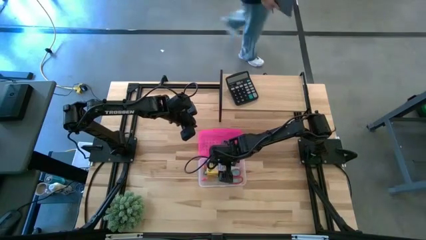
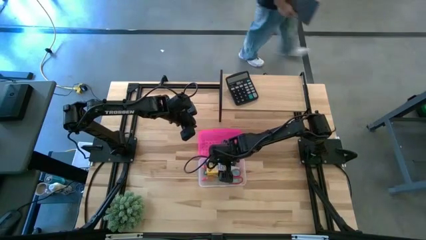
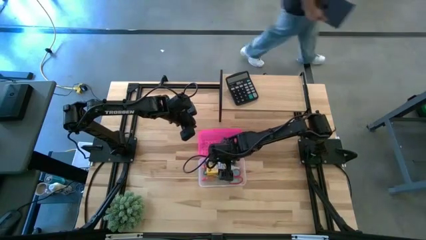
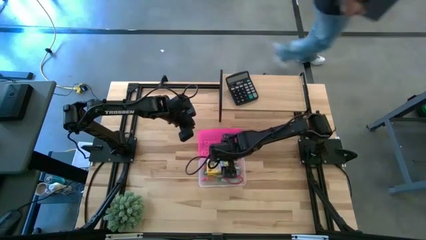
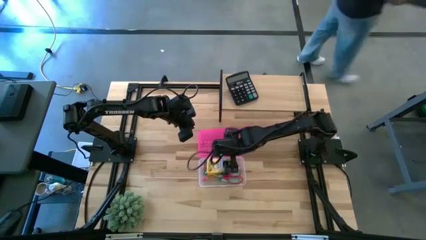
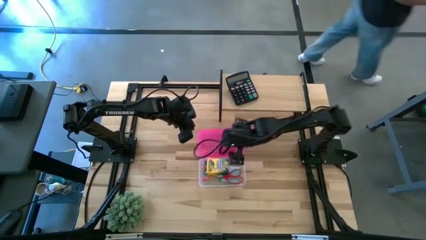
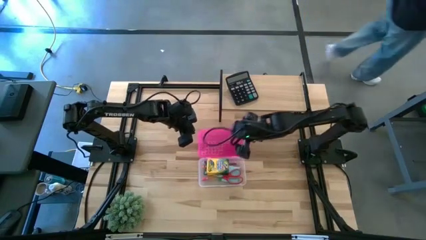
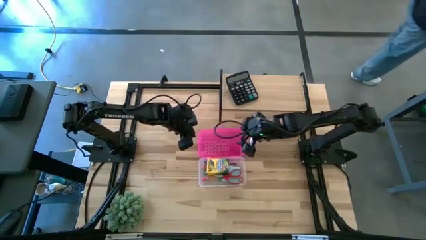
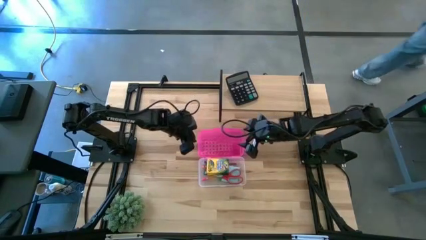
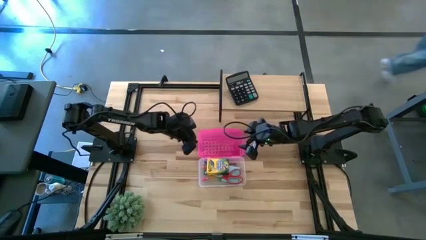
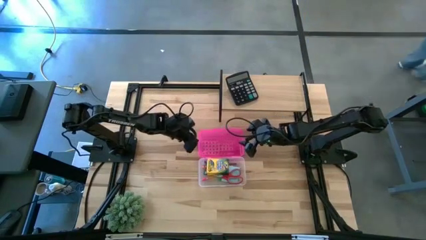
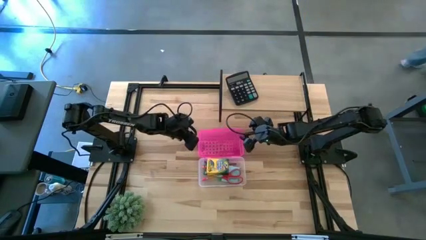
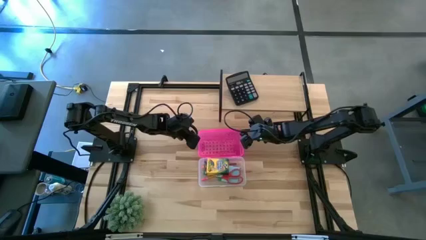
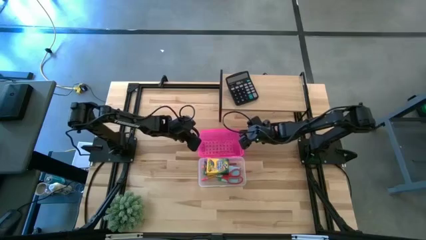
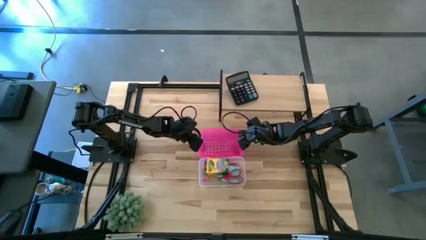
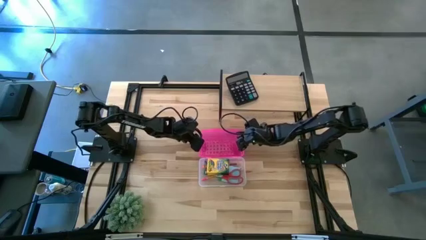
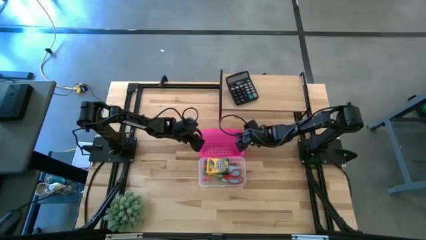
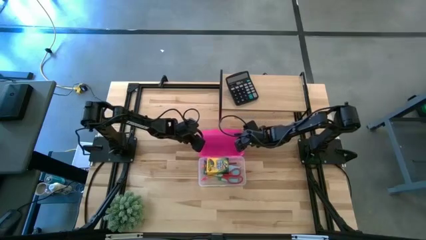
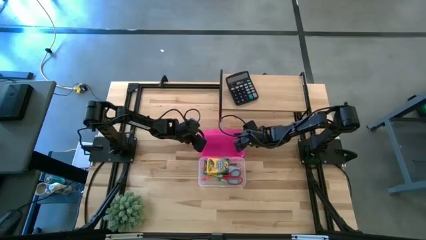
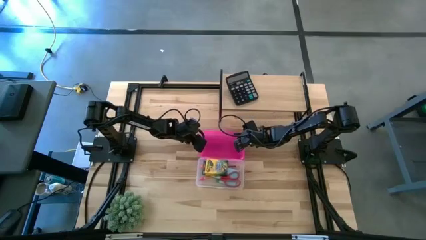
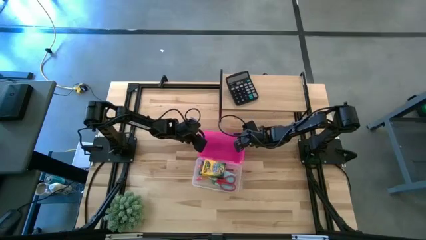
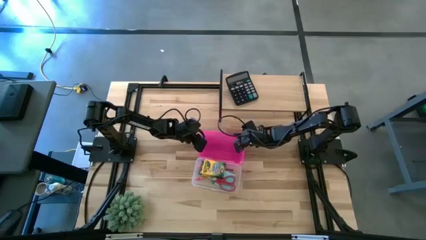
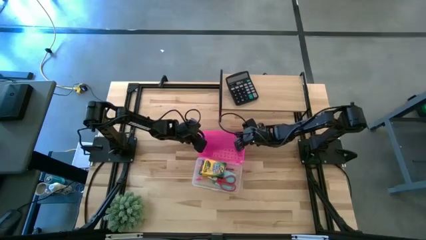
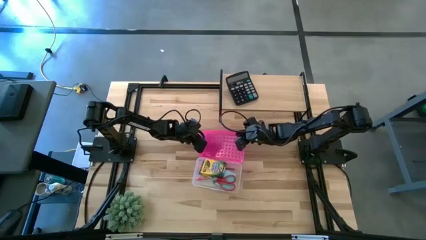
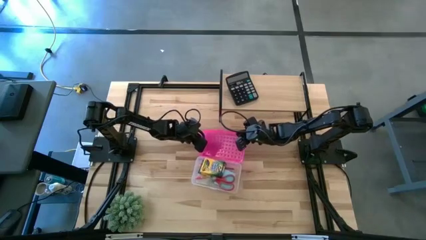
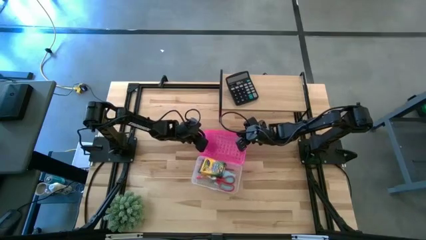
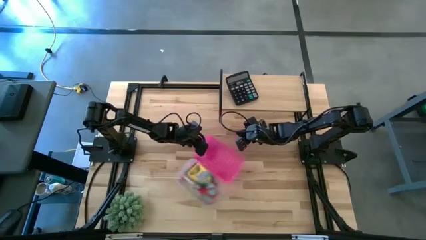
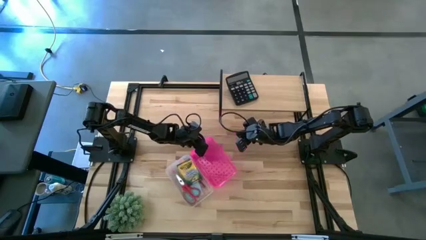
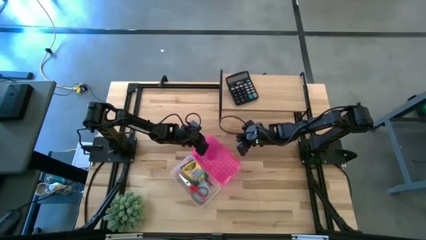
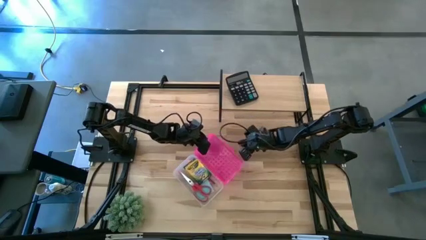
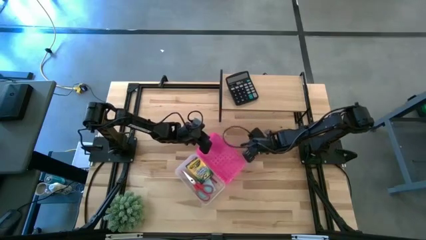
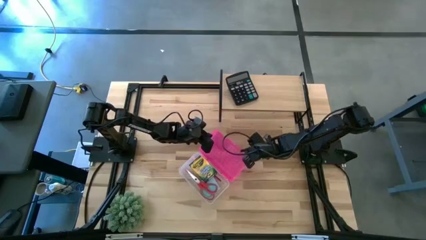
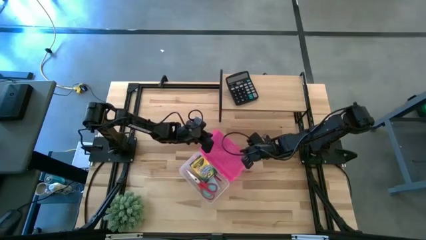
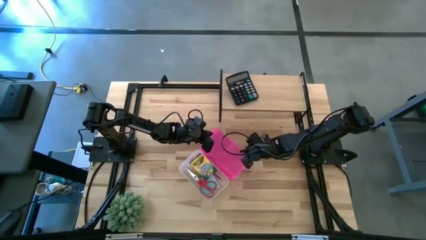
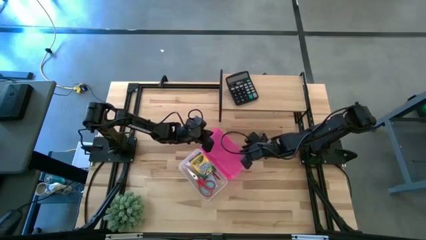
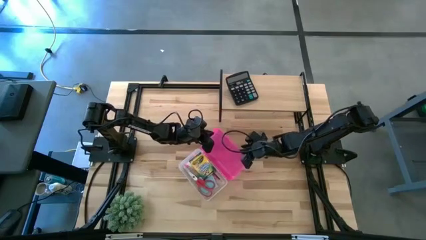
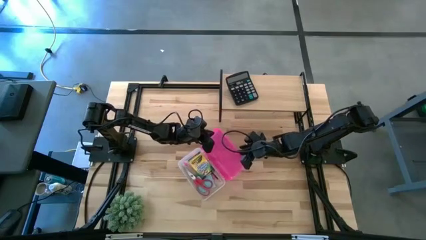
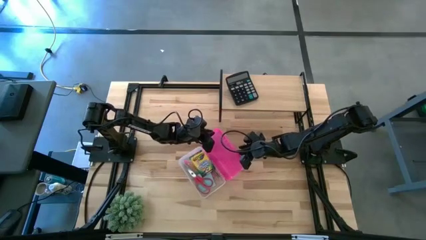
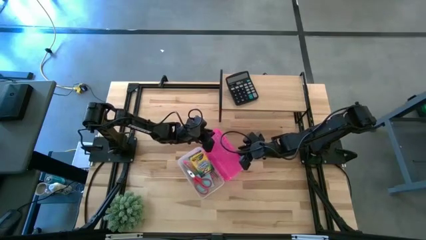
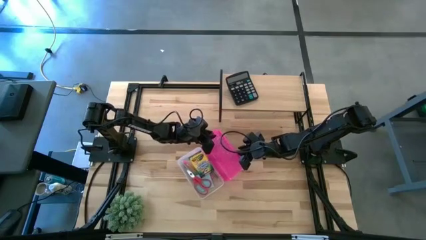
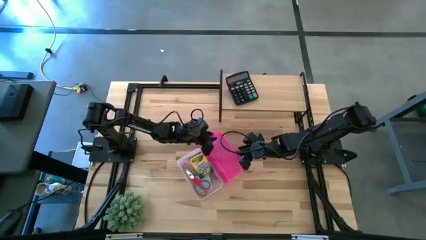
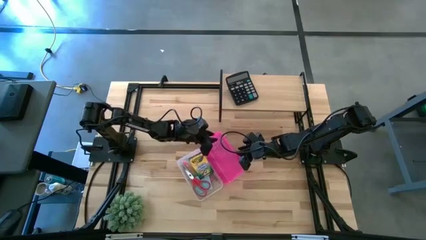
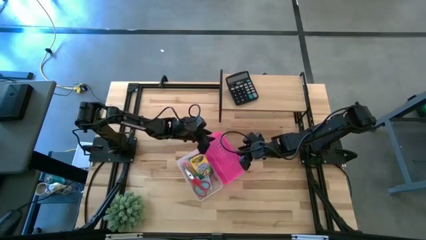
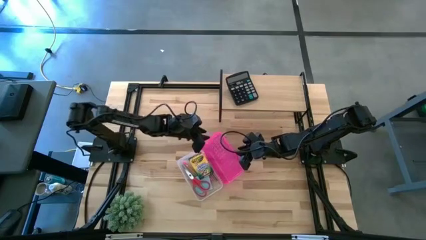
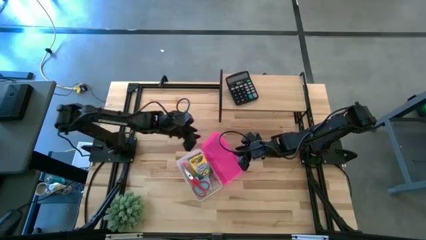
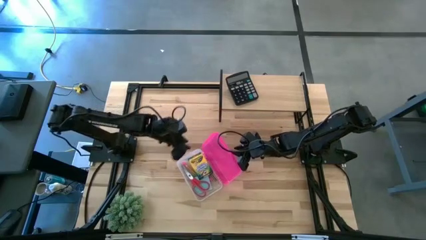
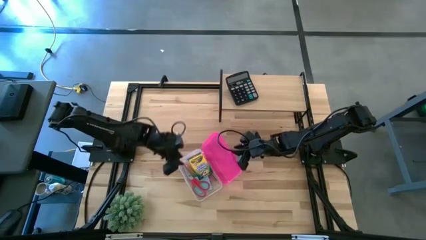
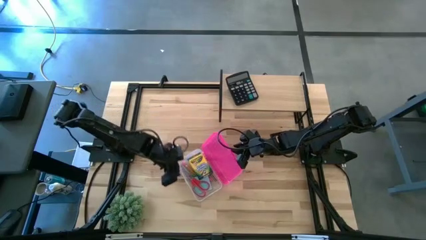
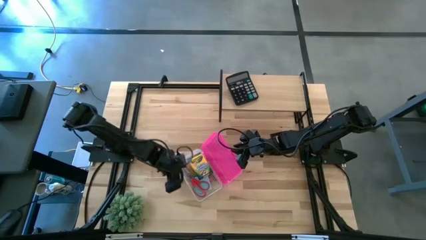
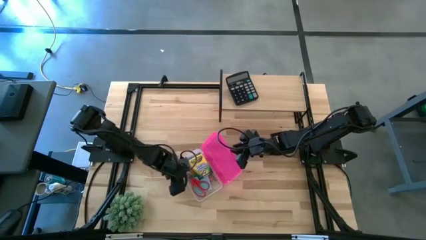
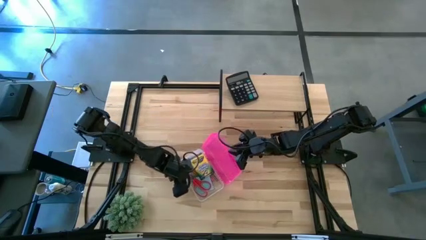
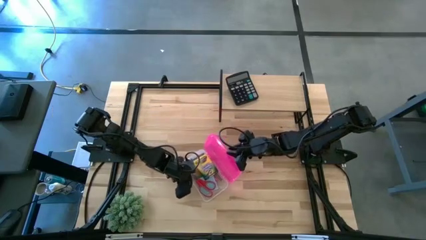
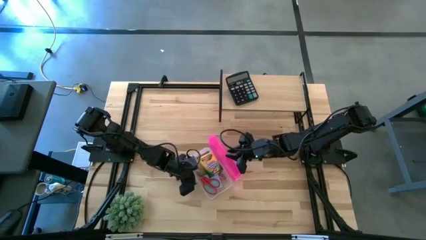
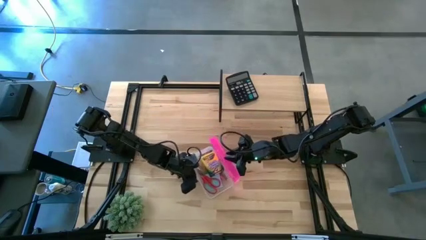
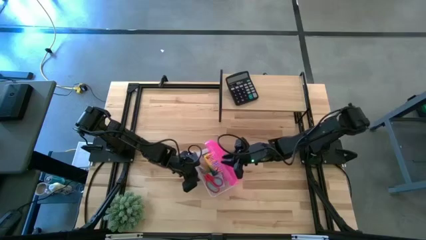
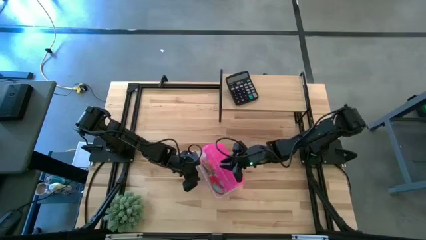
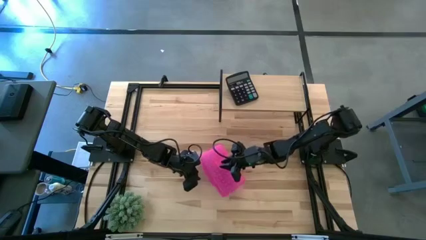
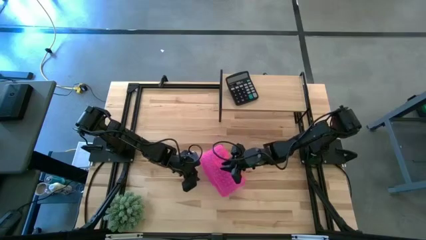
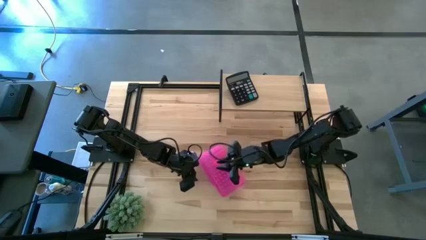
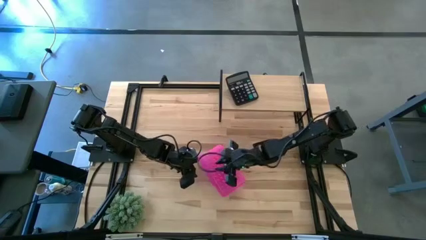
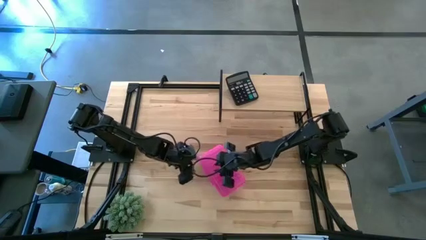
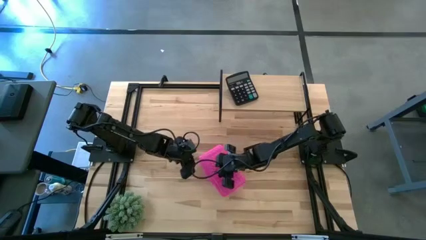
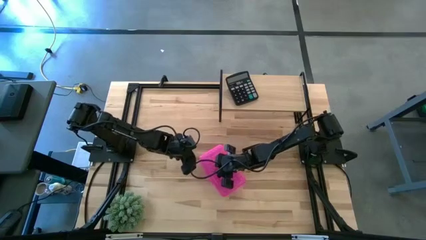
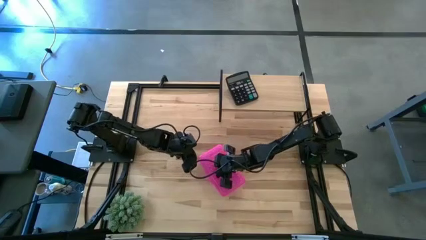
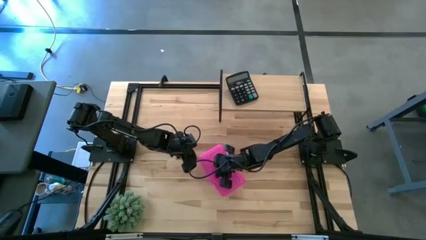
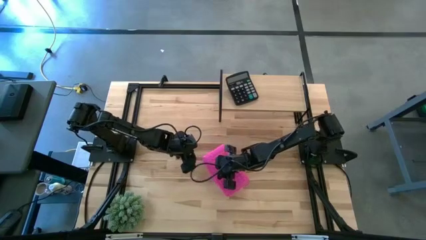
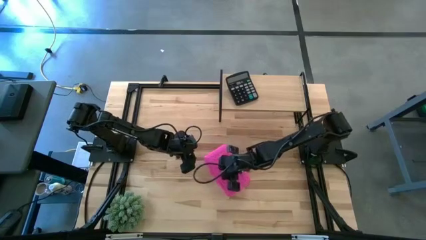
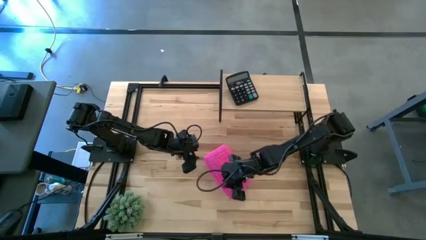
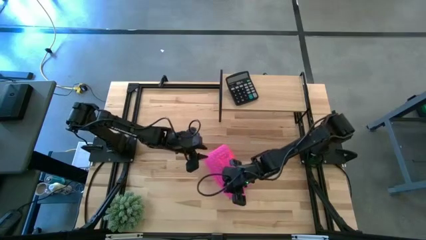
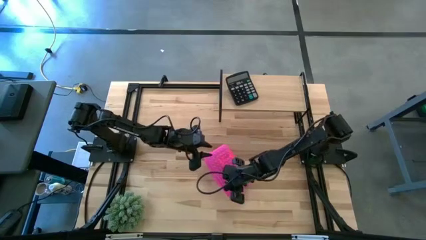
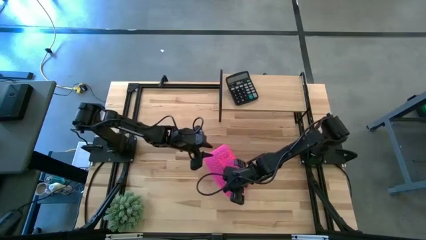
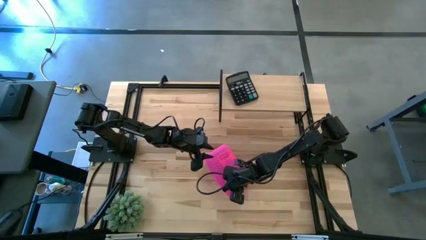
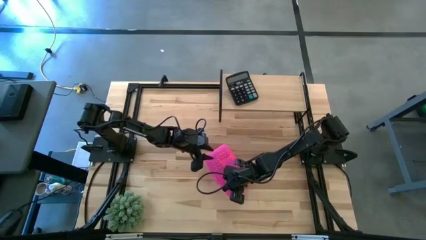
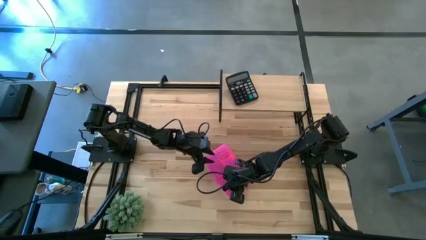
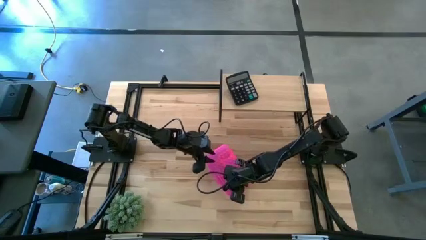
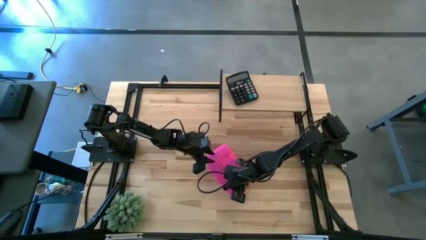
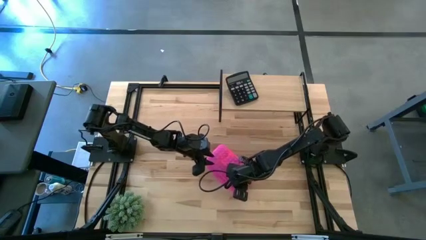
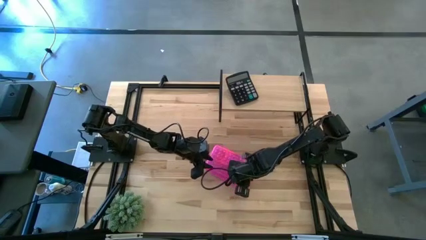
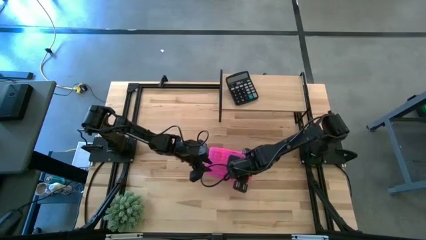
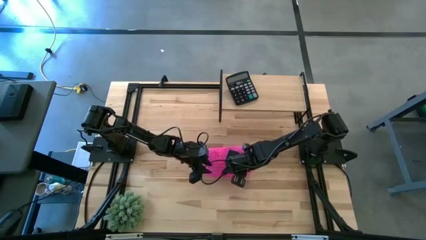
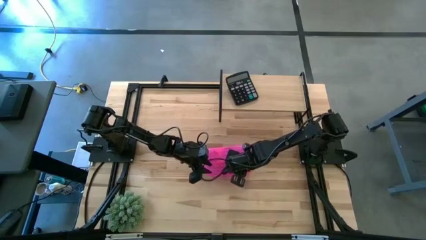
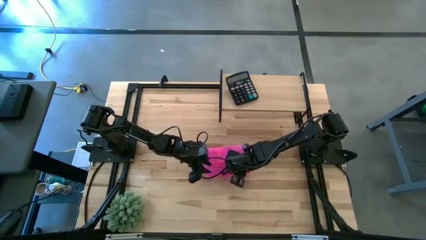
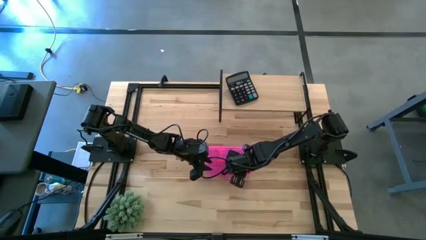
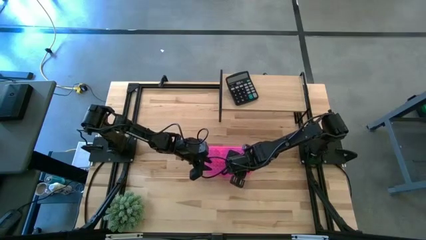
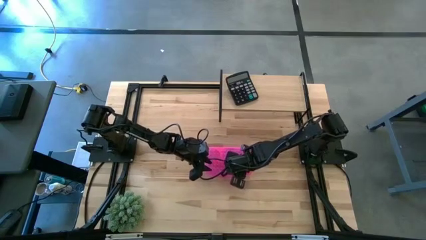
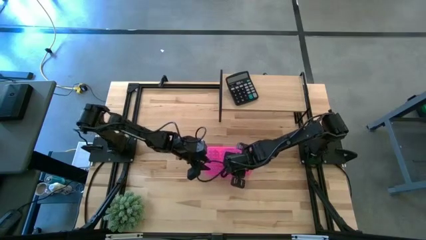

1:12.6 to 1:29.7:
Task: Pack school essentials
Close the box
